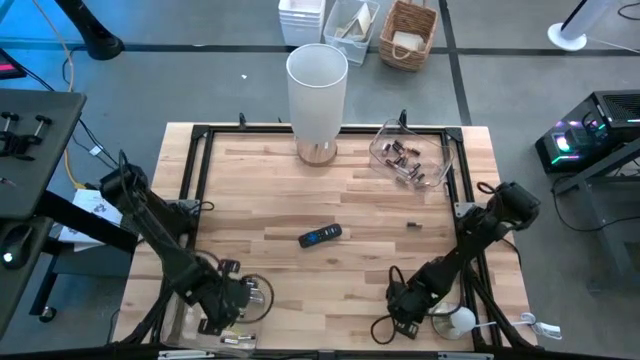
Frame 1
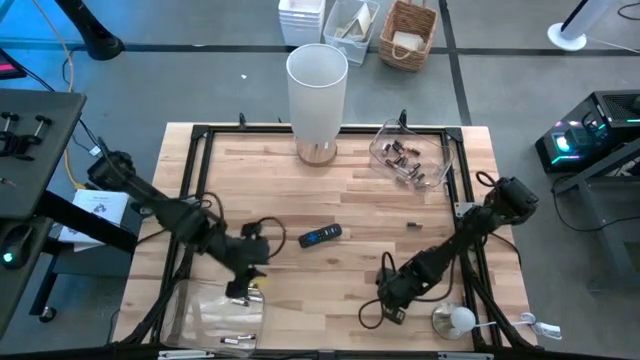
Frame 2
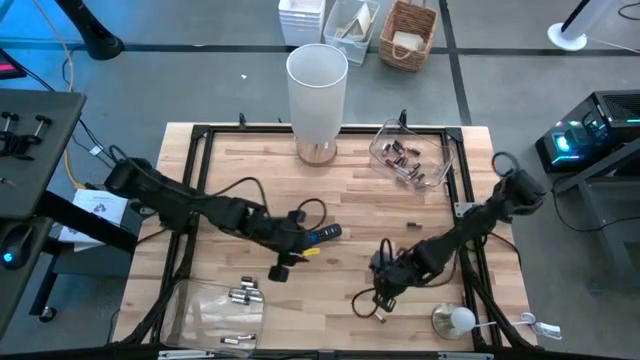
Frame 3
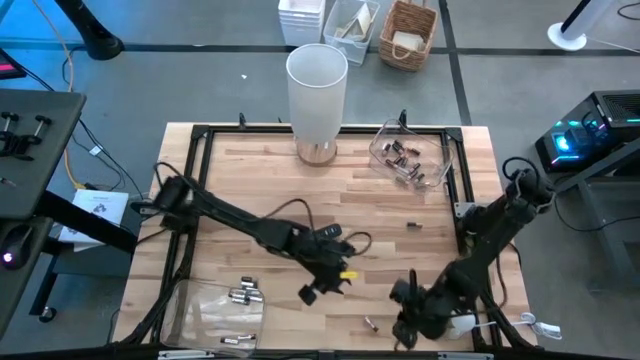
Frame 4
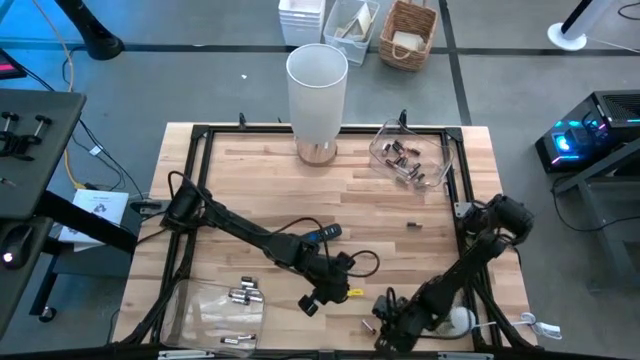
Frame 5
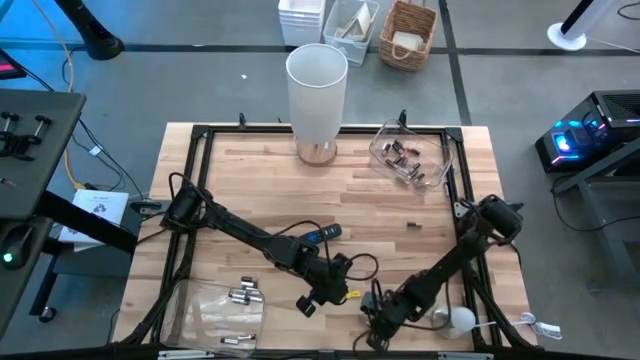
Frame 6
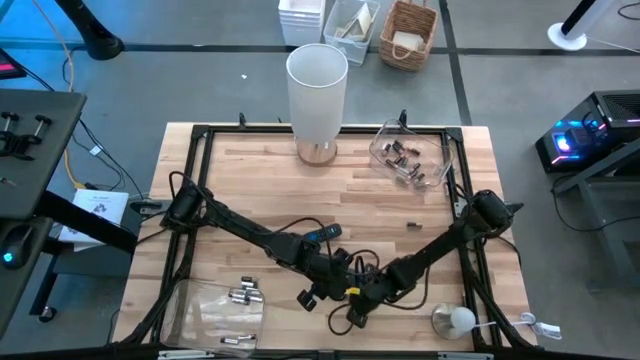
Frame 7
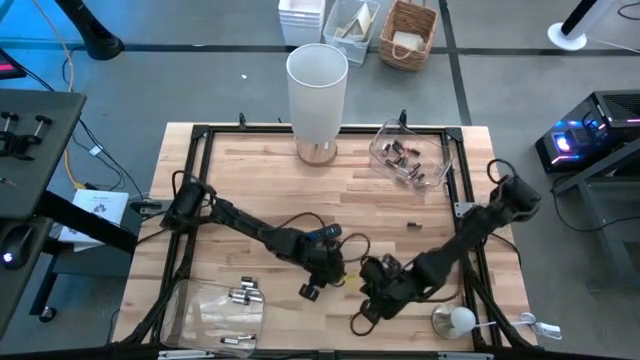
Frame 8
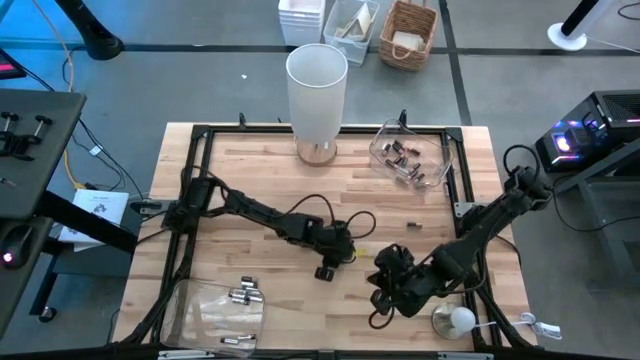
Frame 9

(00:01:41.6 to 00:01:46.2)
Task: Sort batteries
Put the silver battery into the bottom transparent bin

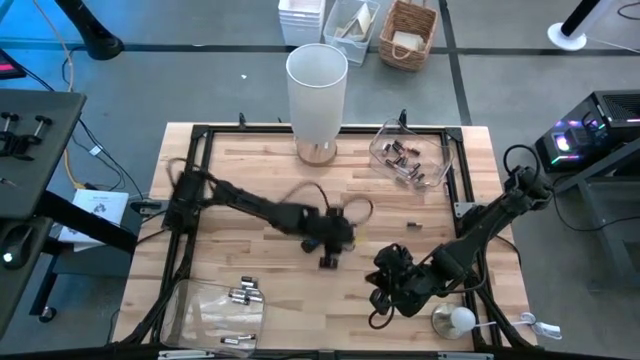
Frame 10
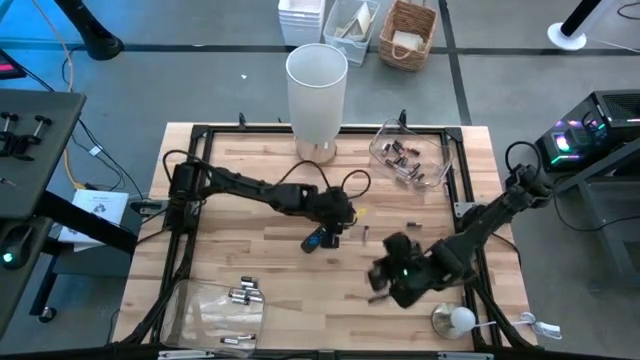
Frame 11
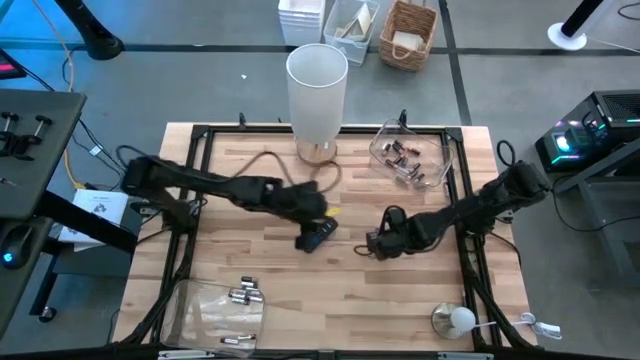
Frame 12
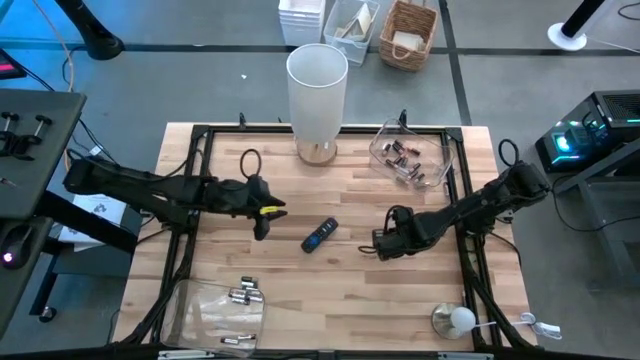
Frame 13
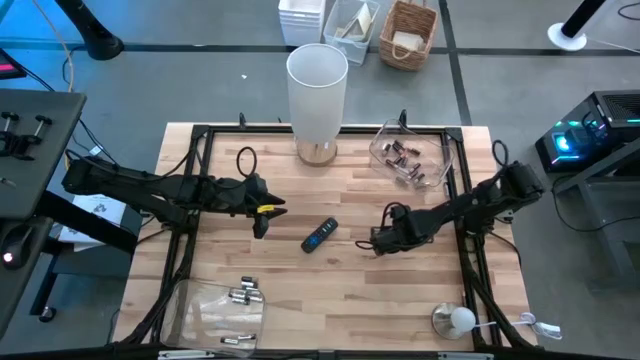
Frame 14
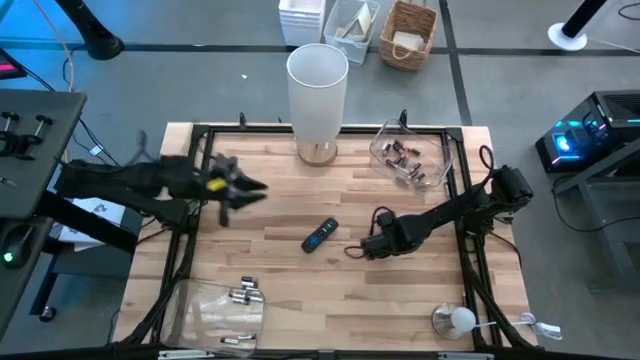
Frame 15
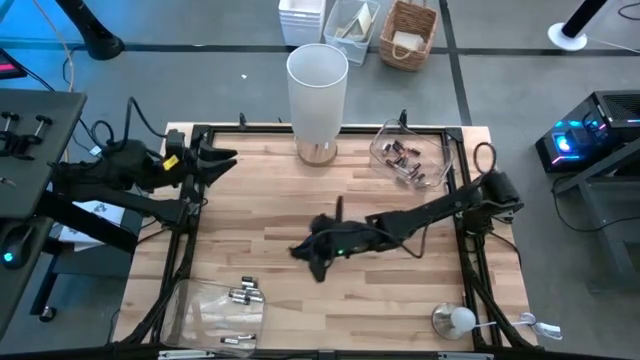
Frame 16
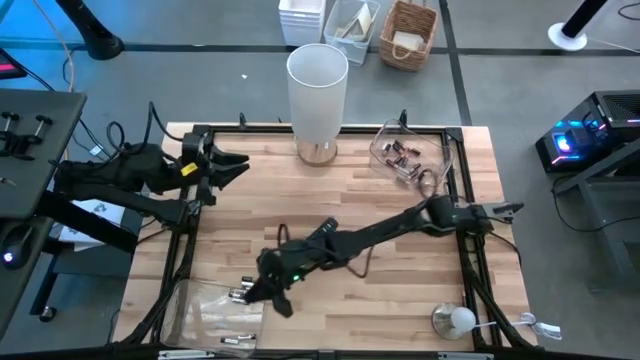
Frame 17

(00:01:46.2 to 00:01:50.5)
Put the silver battery into the bottom transparent bin

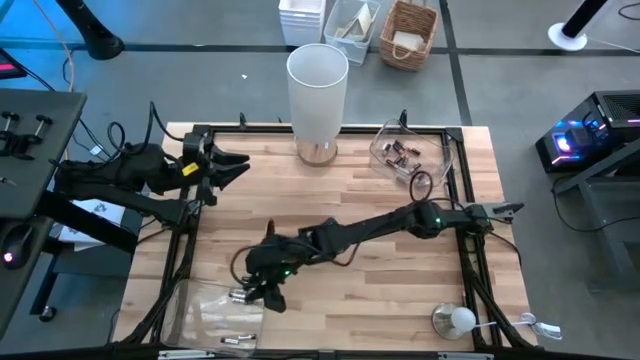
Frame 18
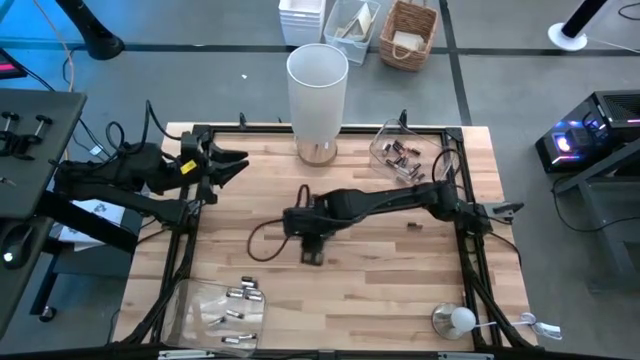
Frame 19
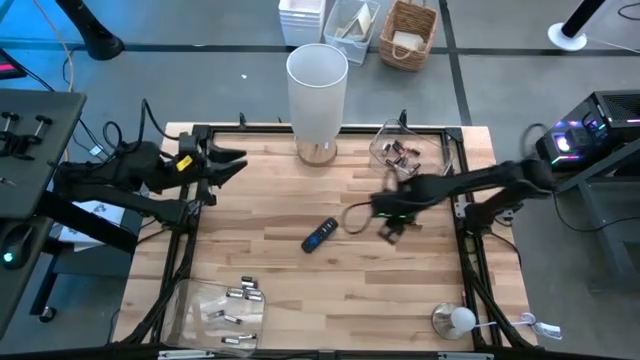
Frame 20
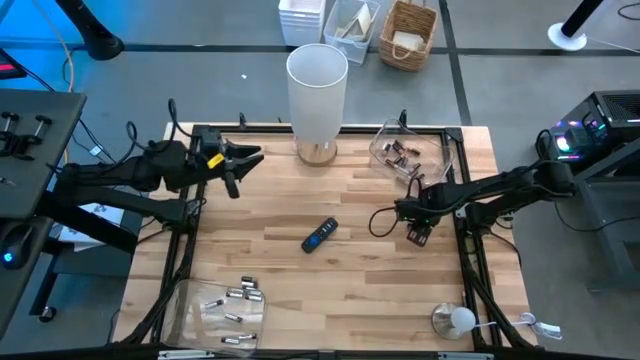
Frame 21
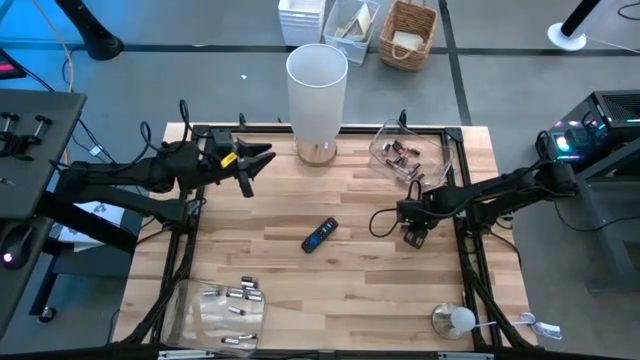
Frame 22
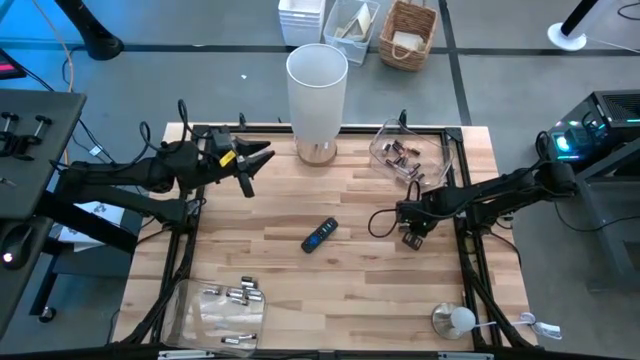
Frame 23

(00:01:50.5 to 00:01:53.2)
Put the black battery into the top transparent bin

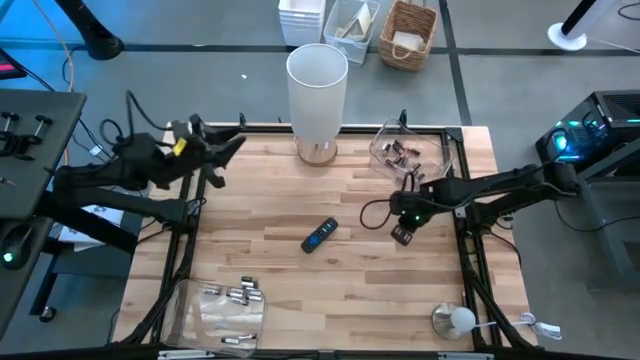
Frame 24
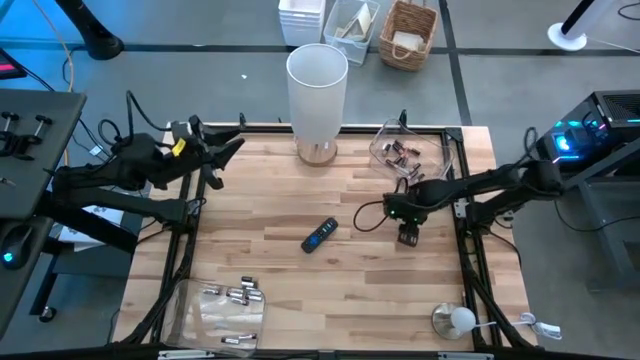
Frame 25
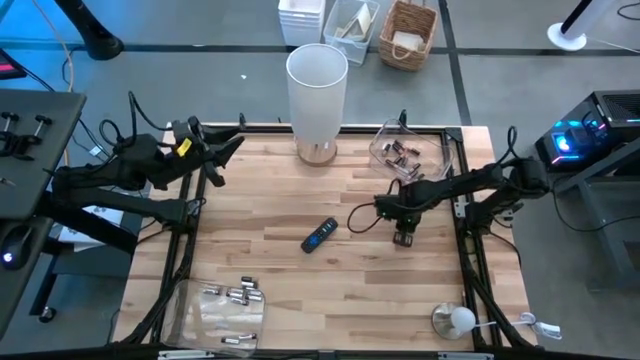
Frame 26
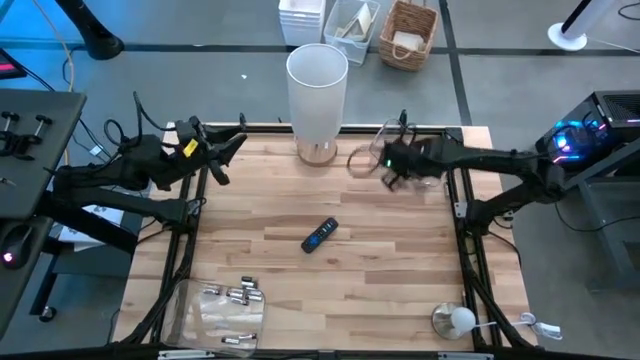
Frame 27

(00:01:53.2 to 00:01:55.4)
Put the black battery into the top transparent bin

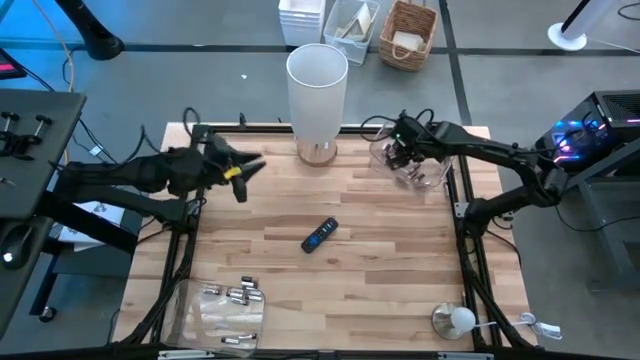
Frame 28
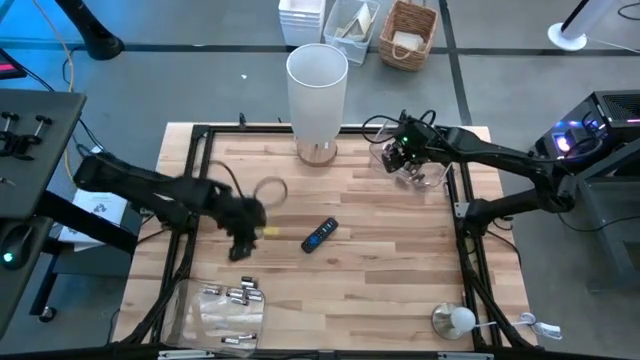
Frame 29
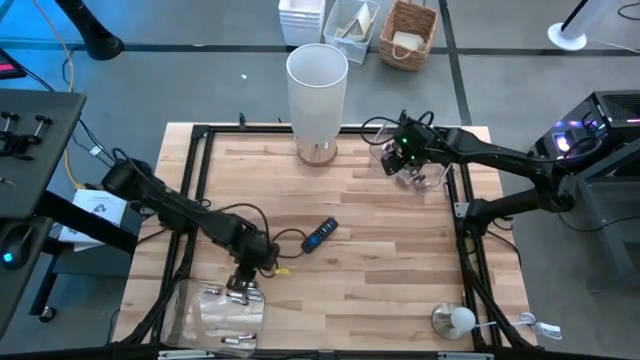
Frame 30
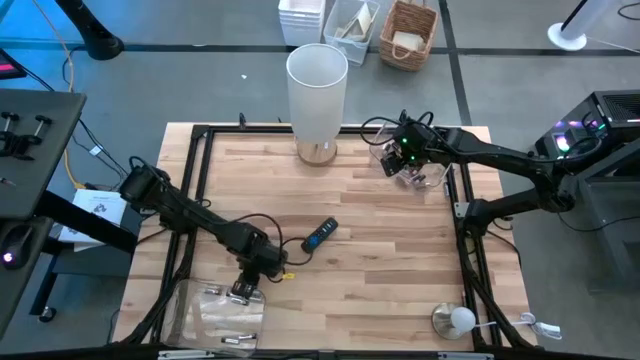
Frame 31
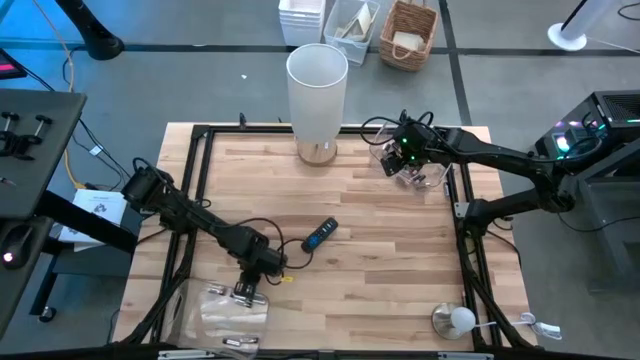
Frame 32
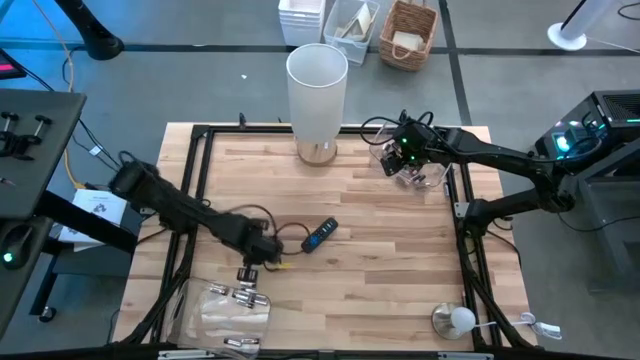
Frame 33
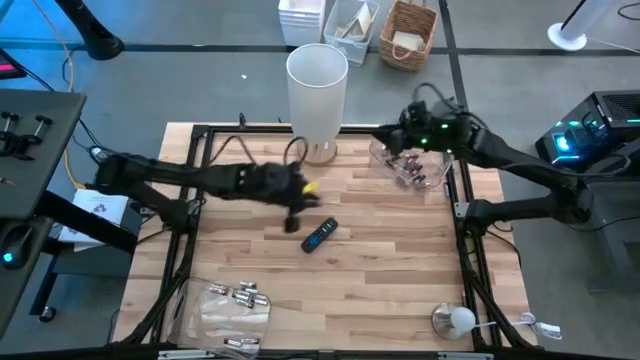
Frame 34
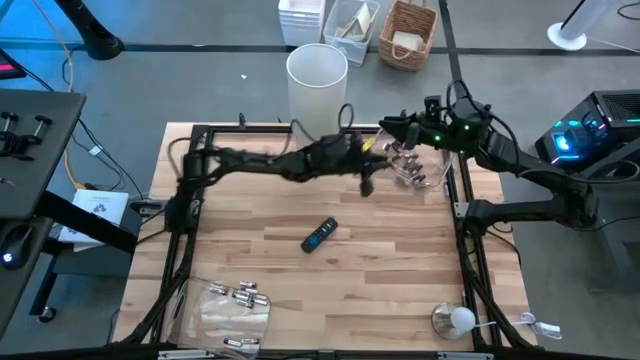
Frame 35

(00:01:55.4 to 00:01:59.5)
Put the black battery into the top transparent bin

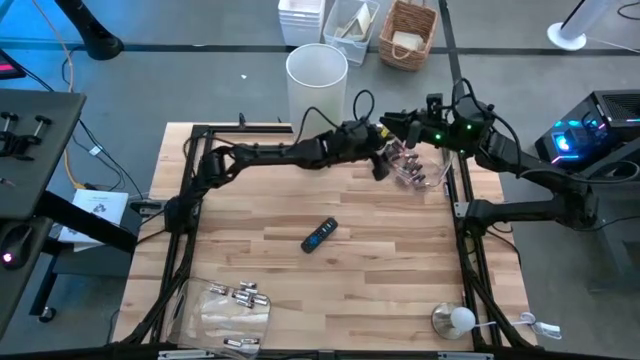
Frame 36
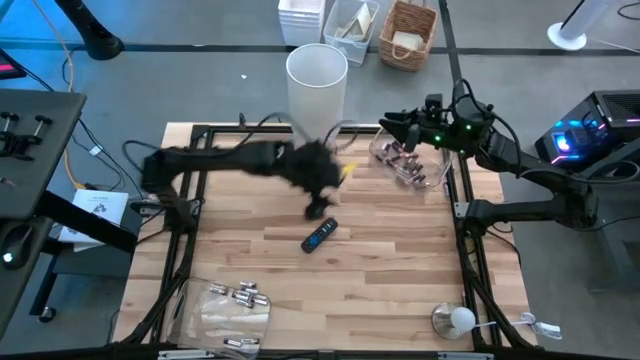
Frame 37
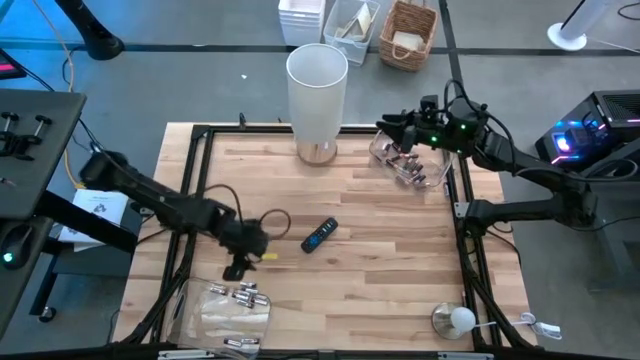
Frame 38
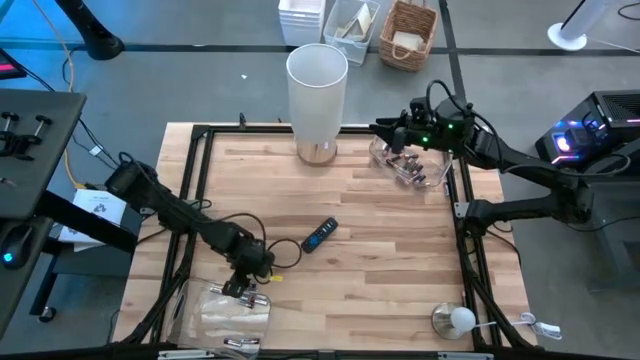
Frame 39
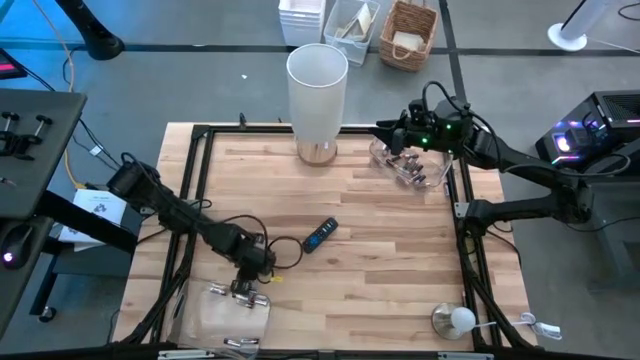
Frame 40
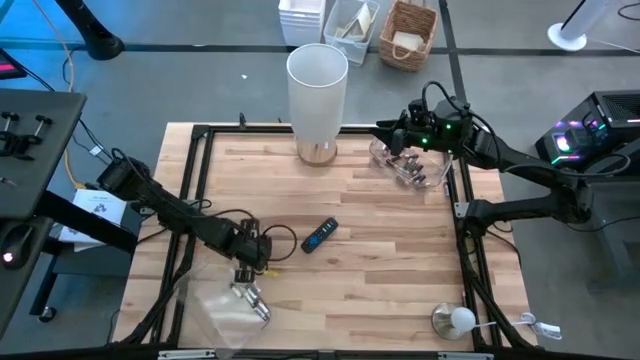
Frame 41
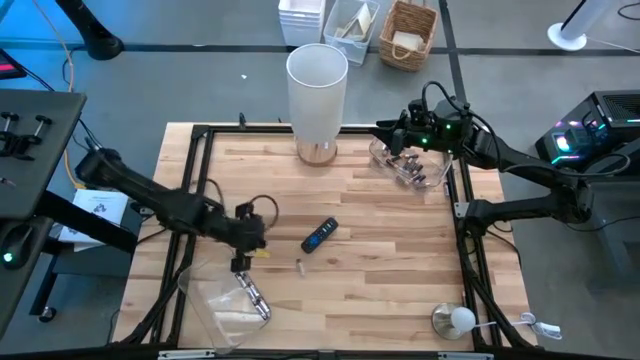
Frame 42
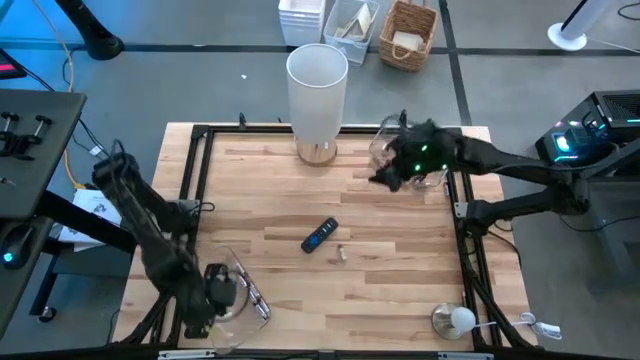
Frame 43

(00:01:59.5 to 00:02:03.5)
Put the silver battery into the bottom transparent bin
